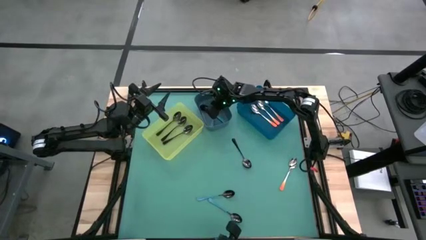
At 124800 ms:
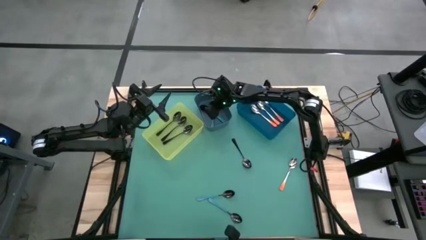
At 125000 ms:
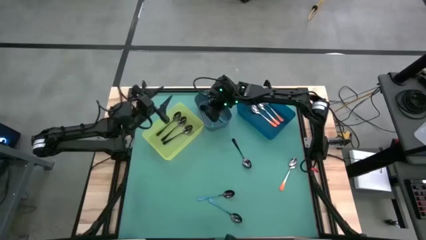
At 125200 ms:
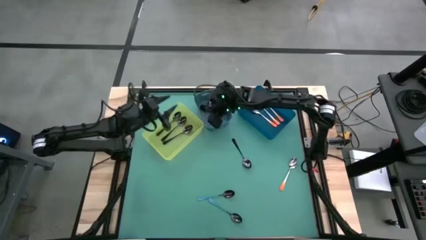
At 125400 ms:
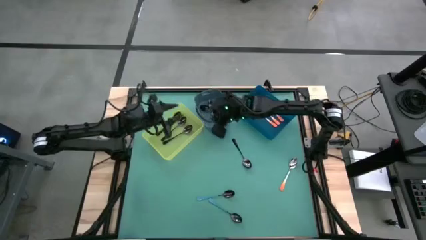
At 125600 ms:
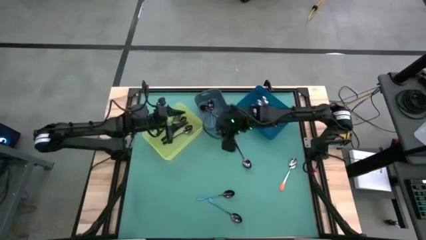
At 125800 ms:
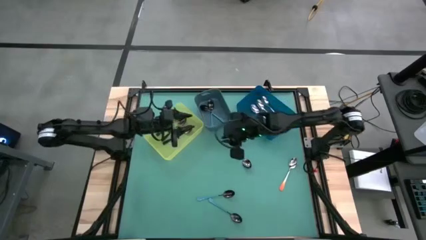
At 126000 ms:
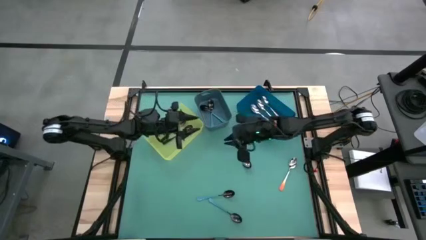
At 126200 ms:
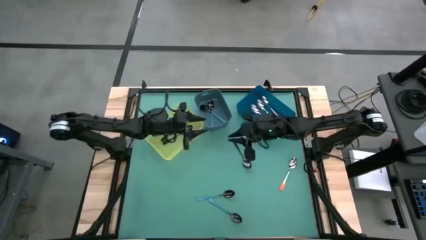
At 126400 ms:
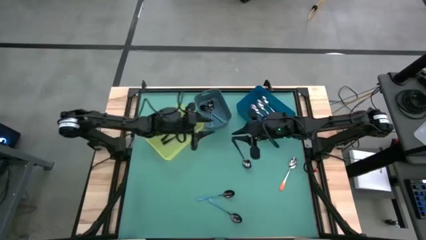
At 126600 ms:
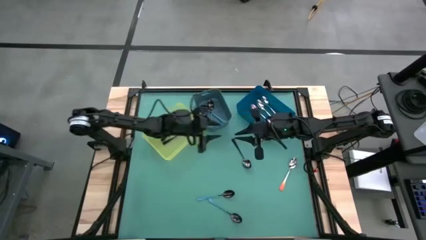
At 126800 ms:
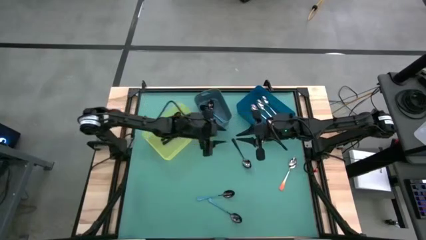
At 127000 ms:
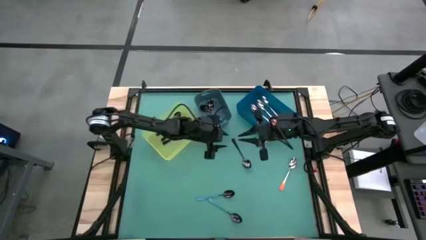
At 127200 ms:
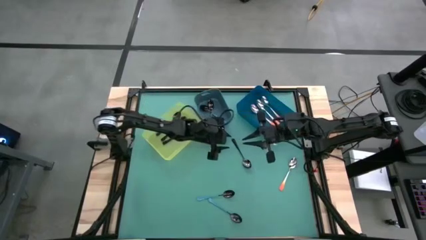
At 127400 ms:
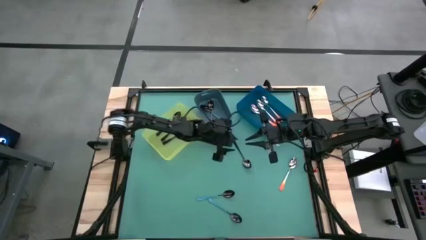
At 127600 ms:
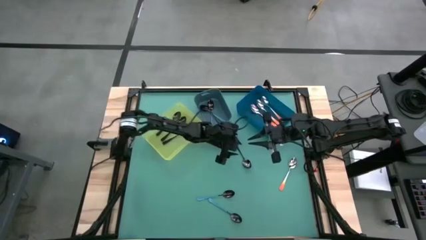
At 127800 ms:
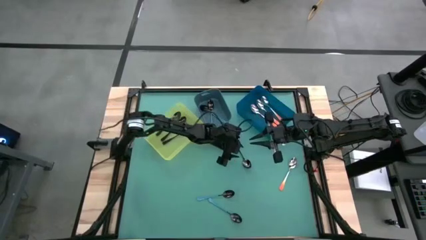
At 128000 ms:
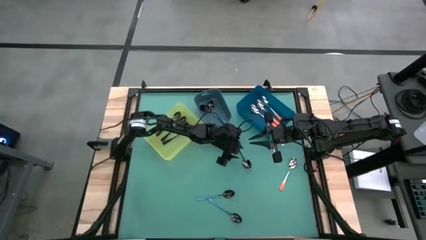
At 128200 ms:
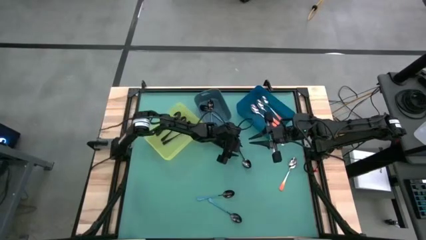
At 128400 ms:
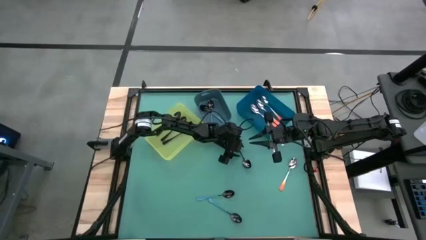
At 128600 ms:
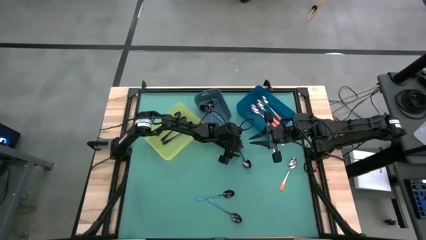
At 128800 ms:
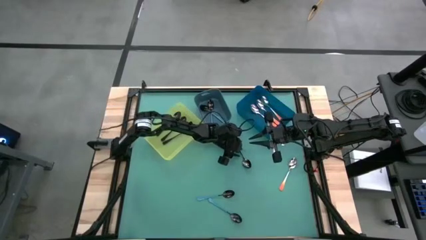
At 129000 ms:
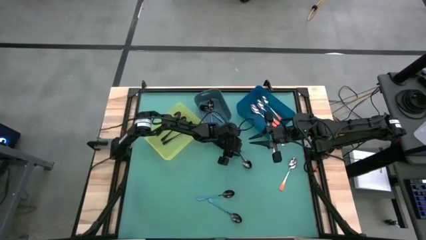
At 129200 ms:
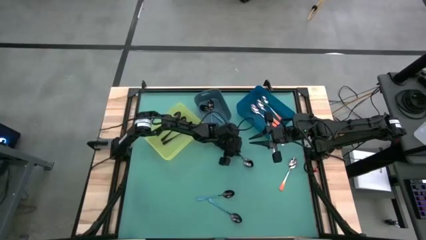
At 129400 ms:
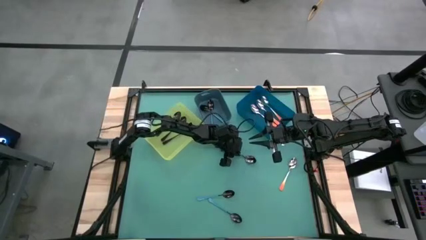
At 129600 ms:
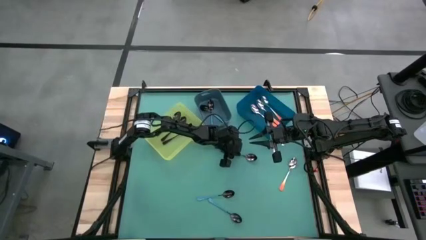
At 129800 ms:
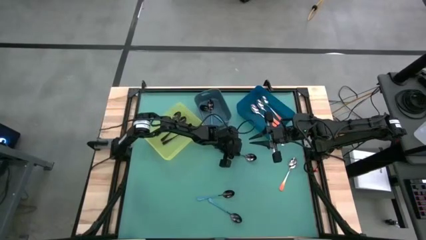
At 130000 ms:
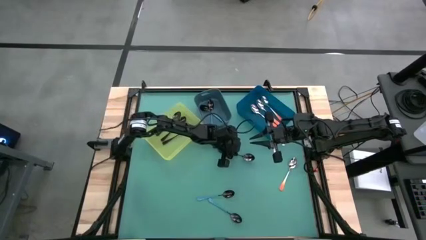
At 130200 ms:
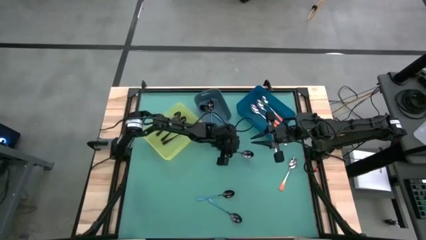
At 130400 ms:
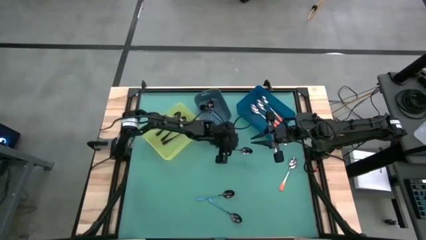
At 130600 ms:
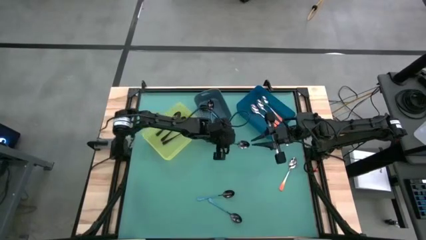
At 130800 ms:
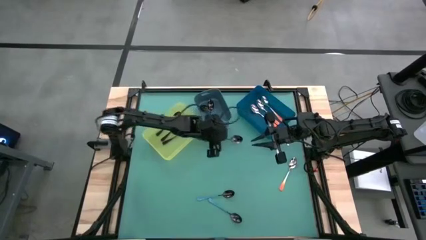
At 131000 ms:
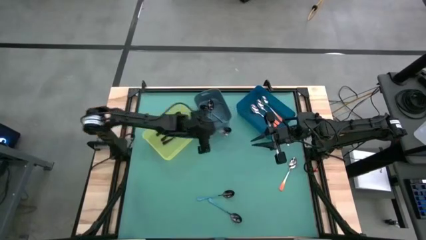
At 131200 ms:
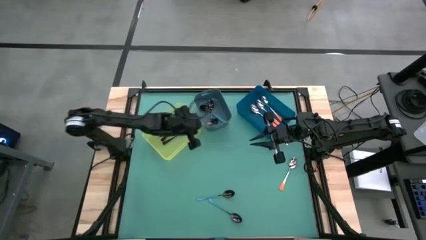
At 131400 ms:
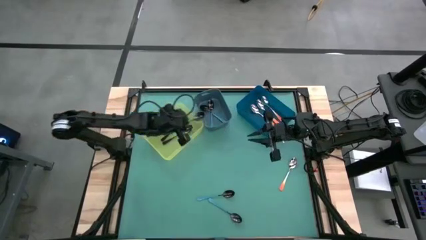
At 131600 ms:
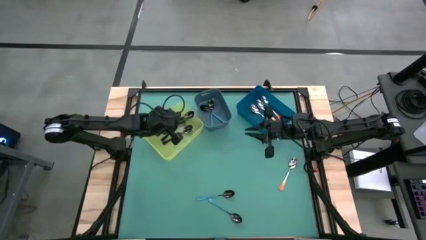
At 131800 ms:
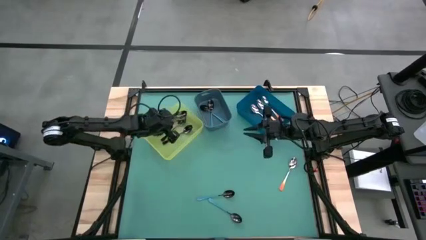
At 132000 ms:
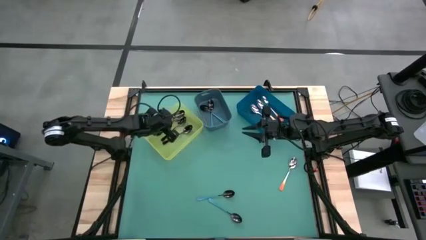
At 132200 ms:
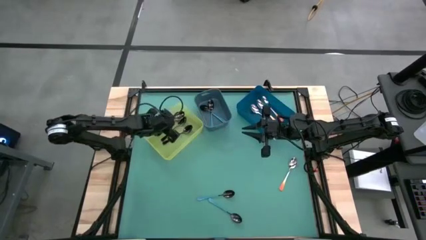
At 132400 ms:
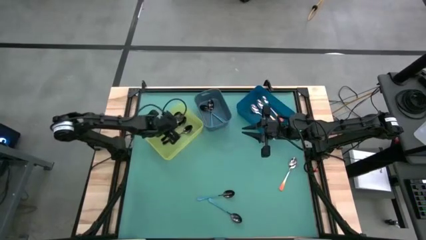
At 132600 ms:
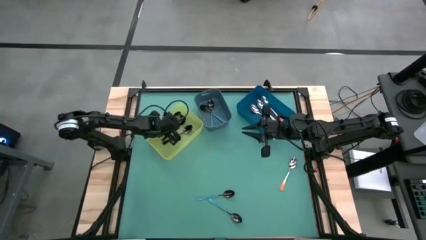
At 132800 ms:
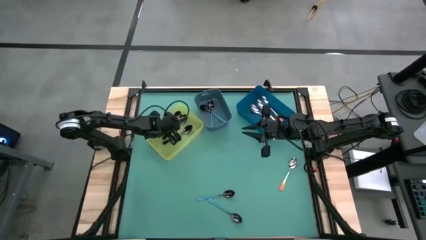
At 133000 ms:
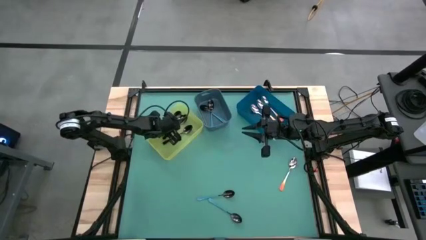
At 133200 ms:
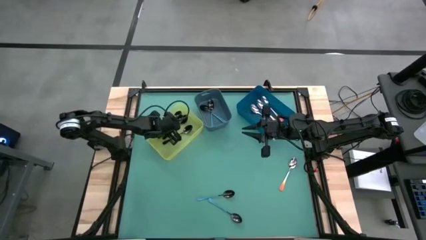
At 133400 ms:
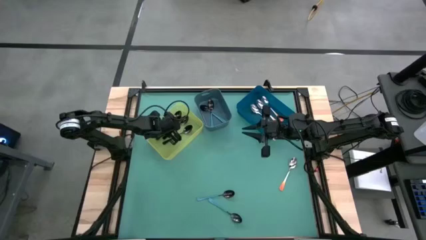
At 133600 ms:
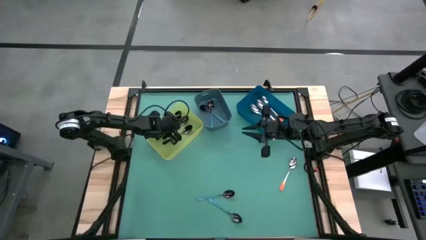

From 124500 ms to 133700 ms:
Task: Sort silverware by color (type)
Put the black spoon into the yellow bin

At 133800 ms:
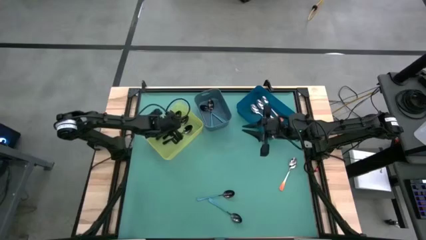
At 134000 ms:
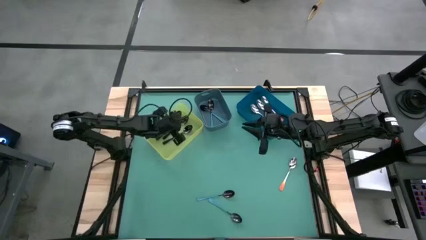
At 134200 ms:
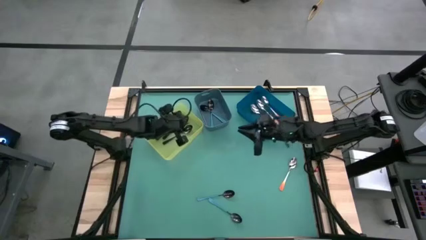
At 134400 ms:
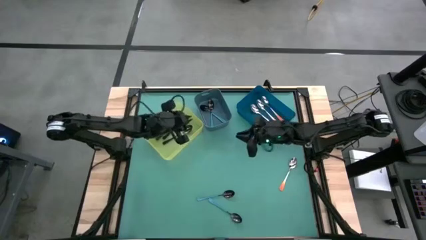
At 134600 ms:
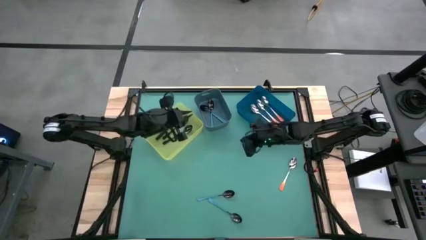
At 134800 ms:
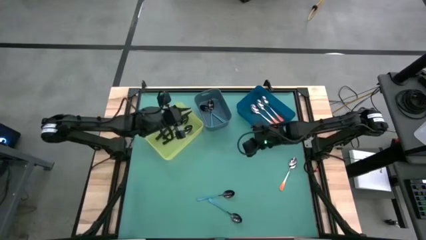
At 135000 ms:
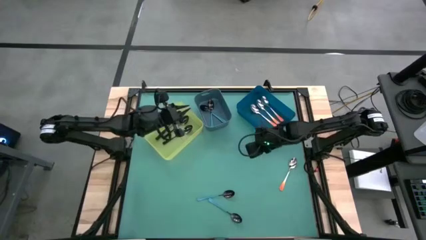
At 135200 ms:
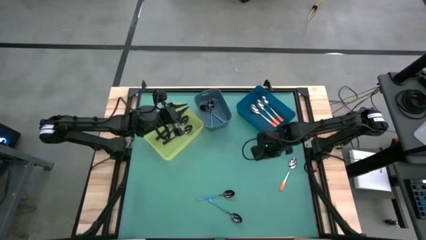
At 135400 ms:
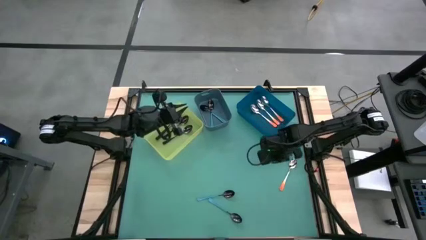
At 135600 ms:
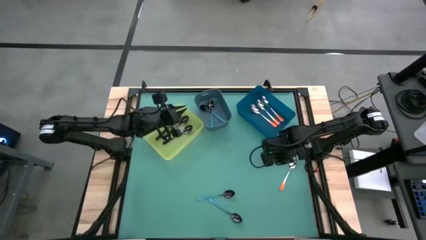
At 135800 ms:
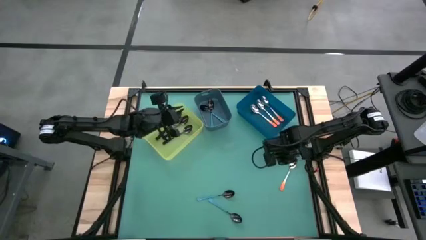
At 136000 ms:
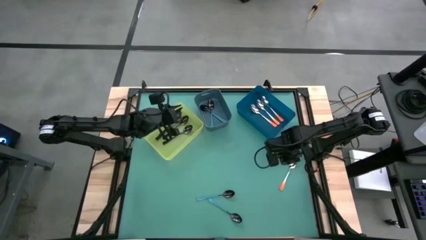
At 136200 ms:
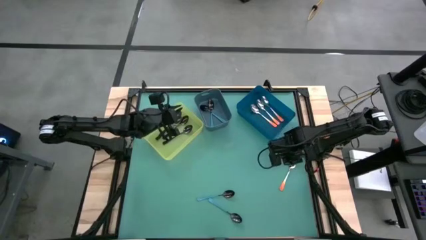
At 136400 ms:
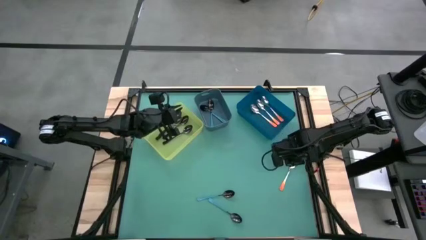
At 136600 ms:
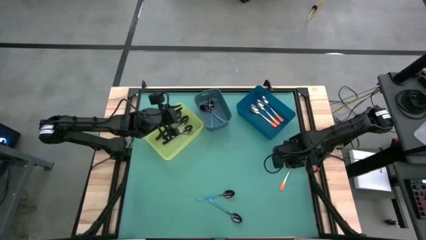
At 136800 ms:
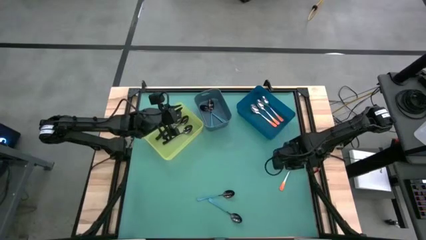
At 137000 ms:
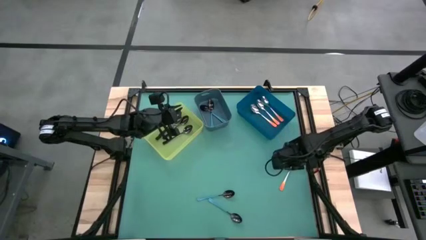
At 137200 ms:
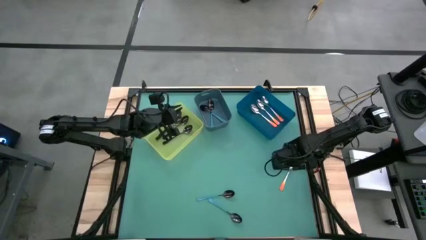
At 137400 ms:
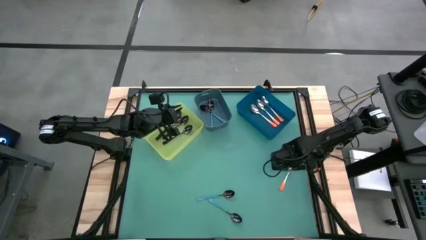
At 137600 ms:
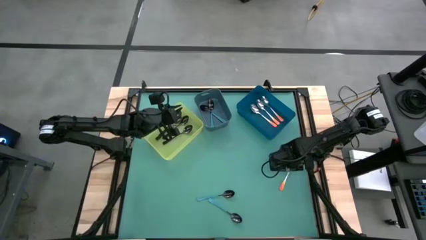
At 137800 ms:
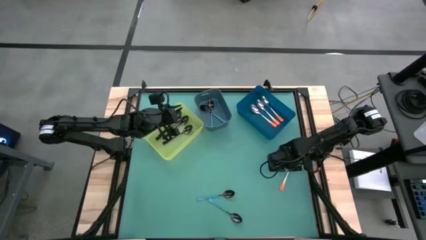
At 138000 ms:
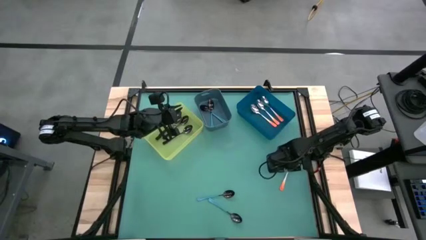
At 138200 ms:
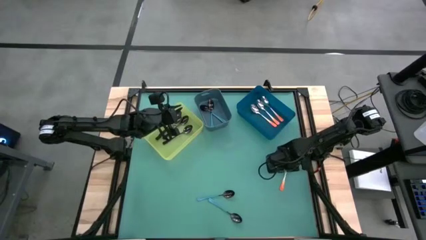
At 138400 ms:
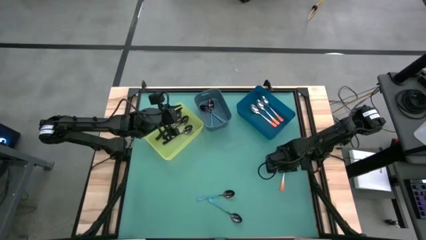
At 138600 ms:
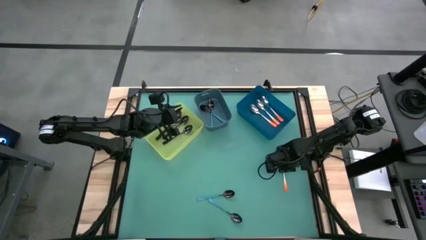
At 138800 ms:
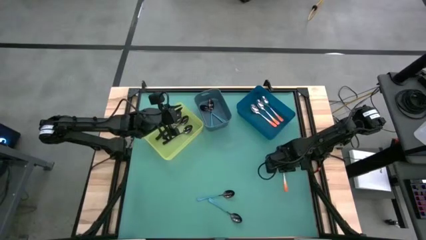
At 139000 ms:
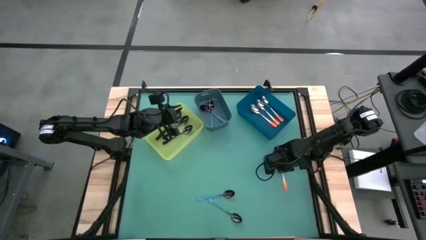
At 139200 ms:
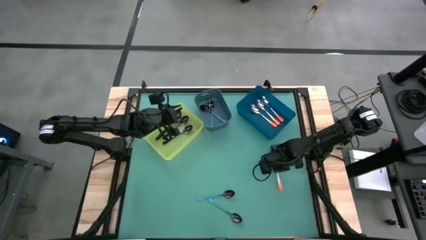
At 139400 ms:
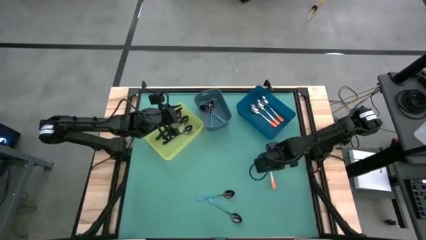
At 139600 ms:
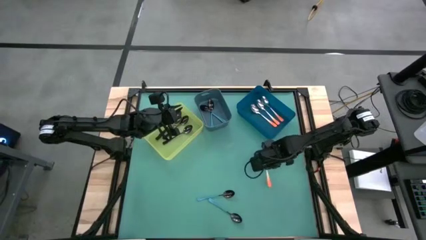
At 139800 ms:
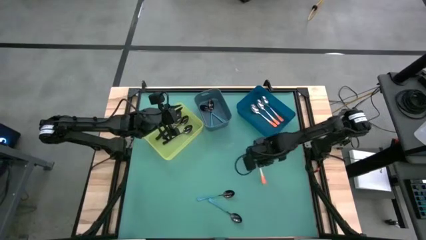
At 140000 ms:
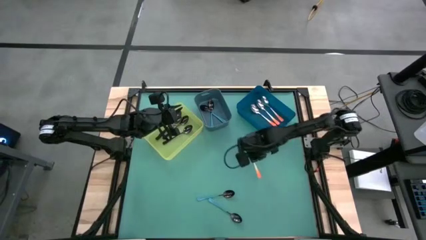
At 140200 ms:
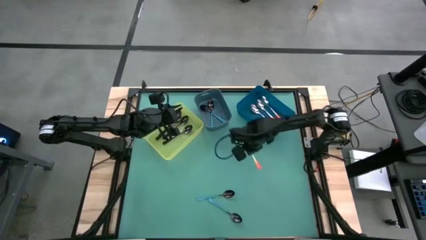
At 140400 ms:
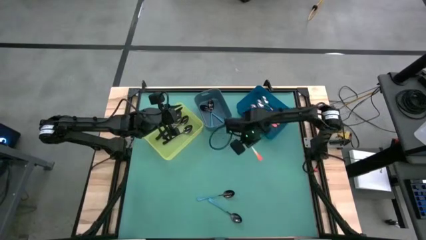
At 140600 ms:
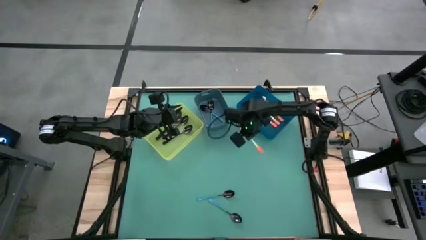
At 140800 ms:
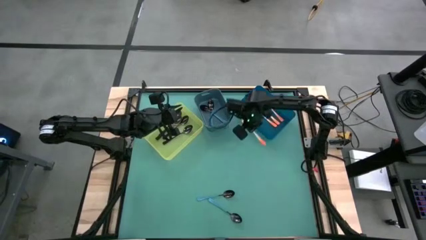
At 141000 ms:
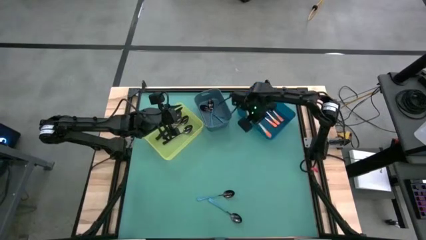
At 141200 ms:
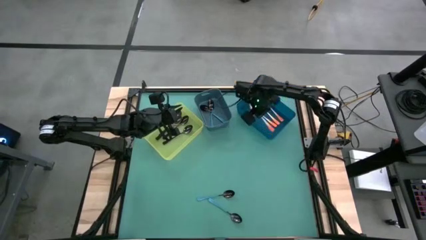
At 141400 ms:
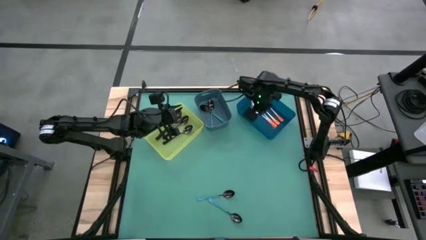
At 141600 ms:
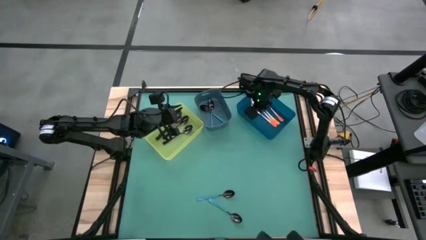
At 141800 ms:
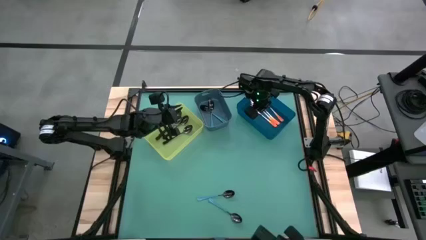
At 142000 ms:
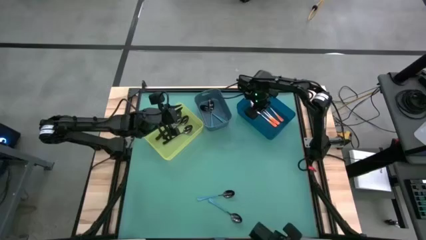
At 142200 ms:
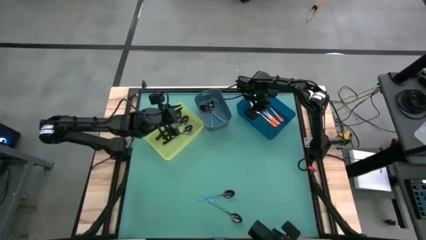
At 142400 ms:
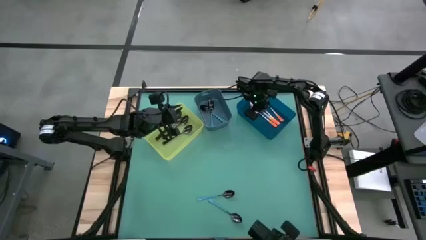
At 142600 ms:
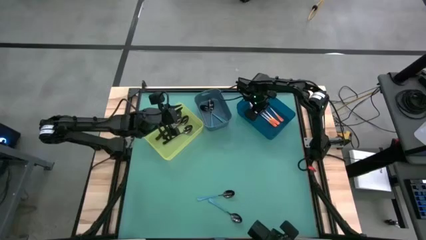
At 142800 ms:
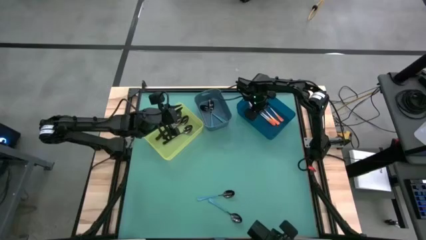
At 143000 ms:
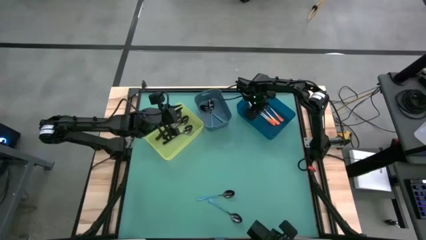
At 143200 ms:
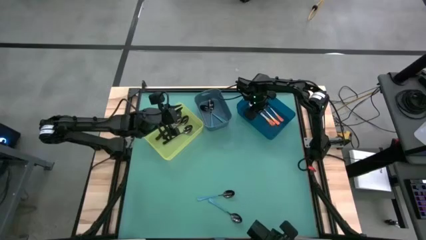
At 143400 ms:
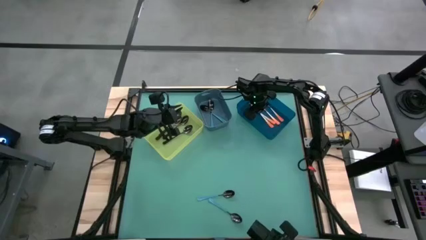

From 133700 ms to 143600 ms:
Put the orange spoon into the blue bin
